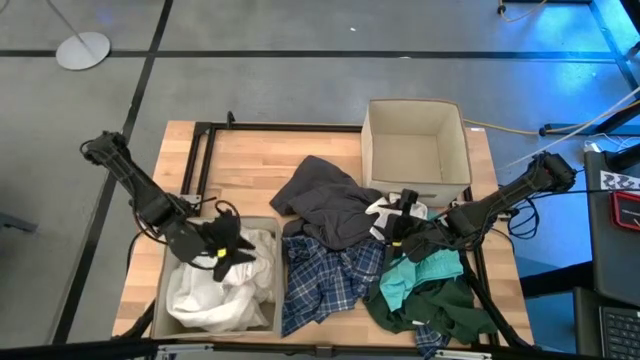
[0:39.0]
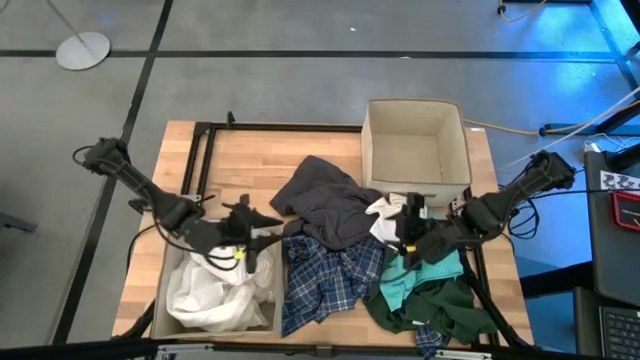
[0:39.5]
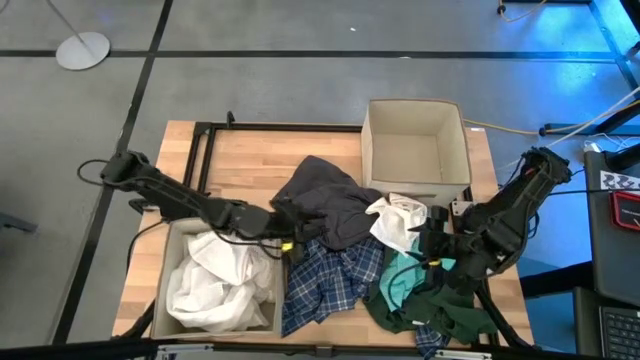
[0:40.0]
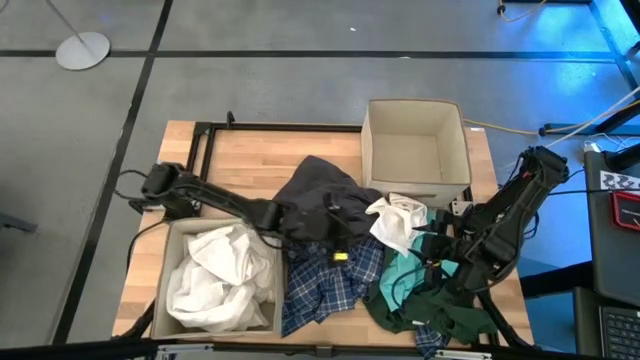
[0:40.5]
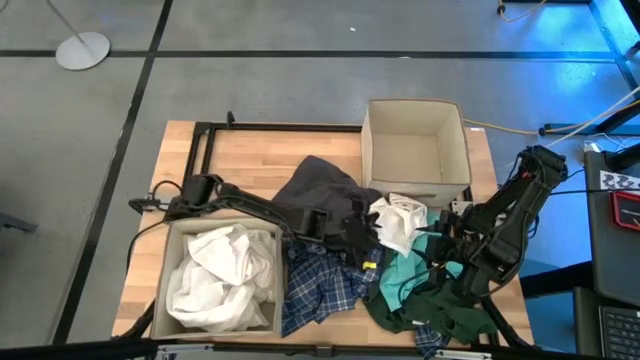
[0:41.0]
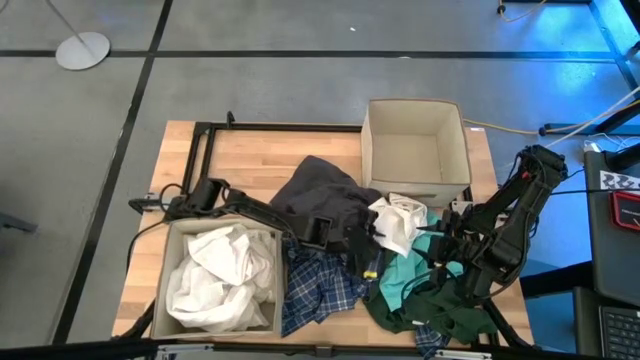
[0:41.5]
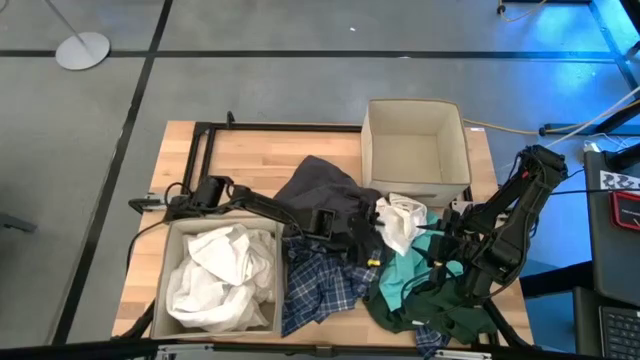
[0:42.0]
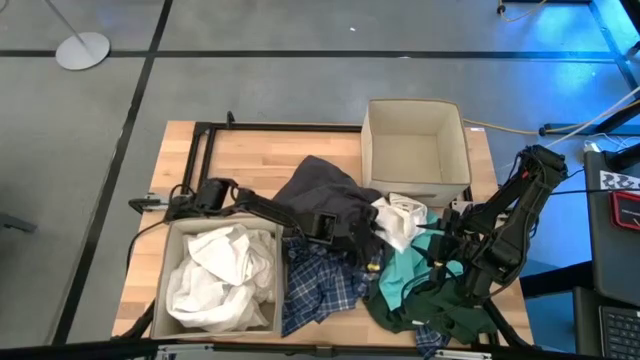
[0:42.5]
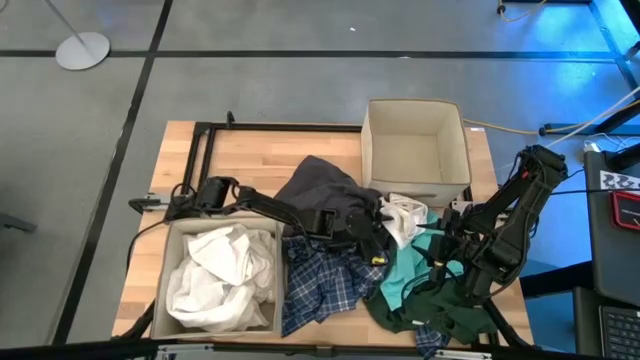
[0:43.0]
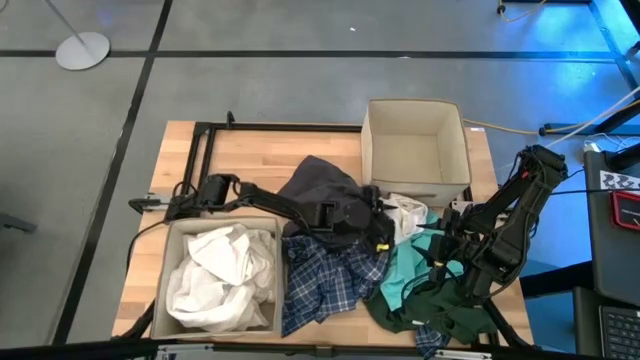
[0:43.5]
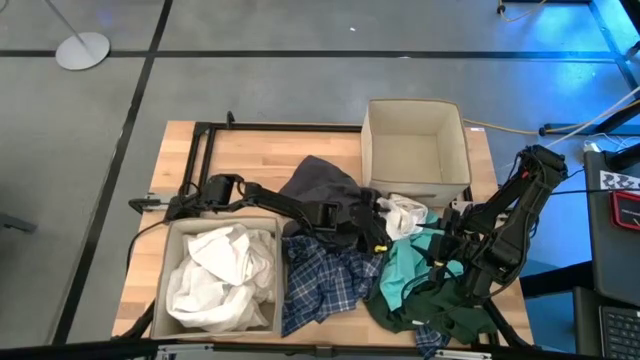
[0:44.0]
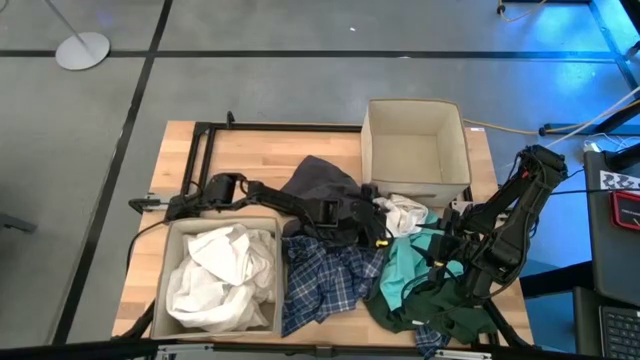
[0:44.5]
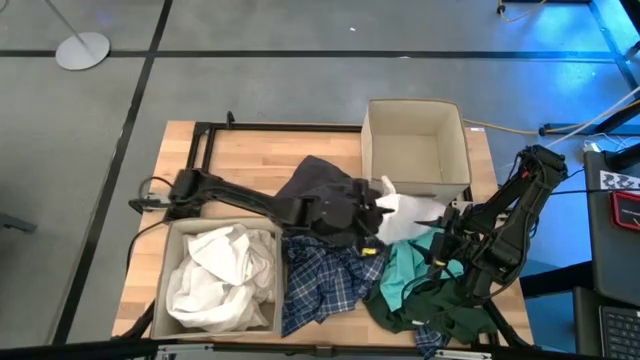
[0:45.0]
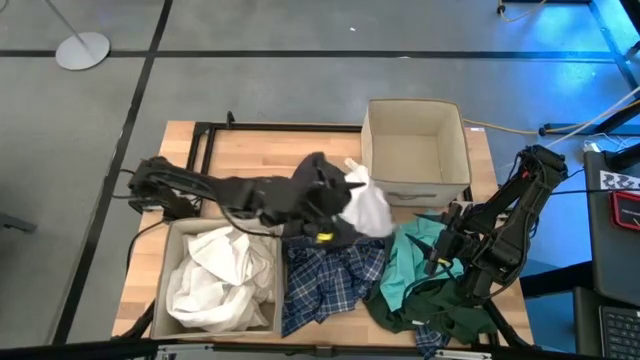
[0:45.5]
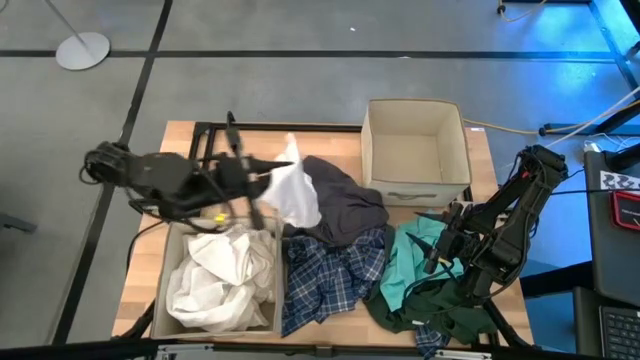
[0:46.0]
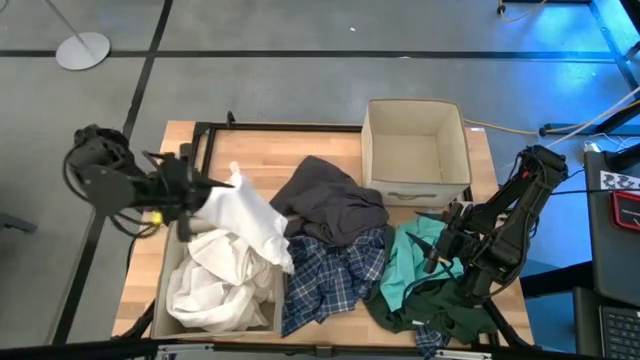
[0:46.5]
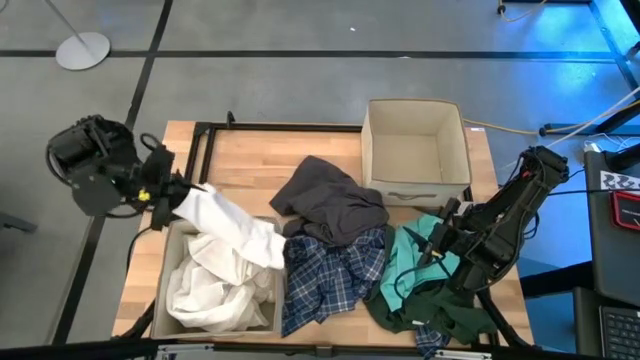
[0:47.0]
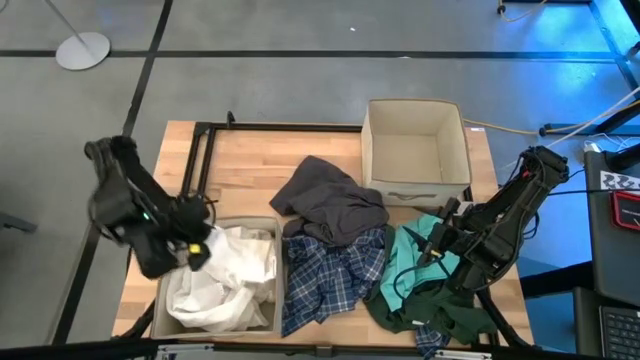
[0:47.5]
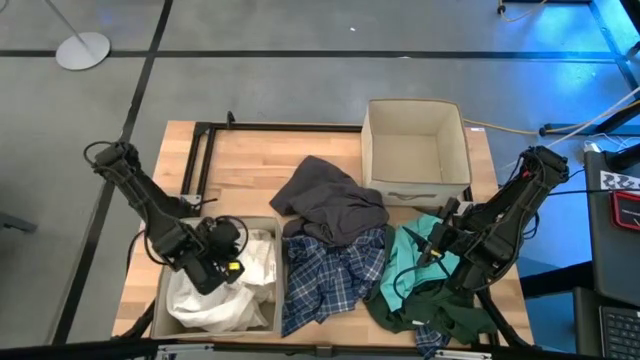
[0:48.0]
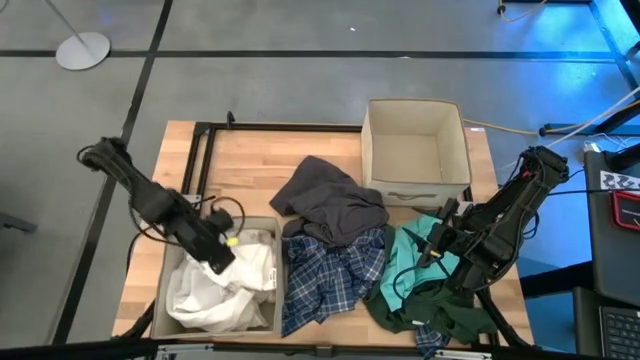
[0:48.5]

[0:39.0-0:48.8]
Task: Sort clothes
Put the white shorts into the bottom brown laundry bin

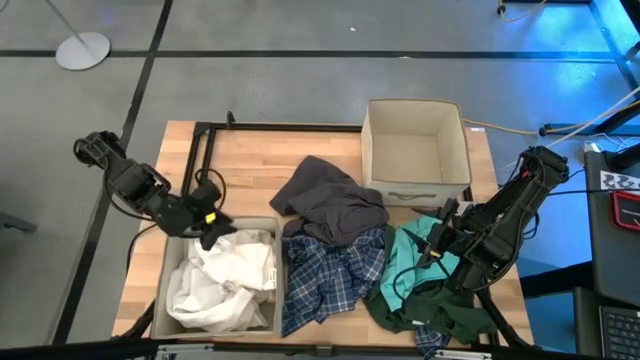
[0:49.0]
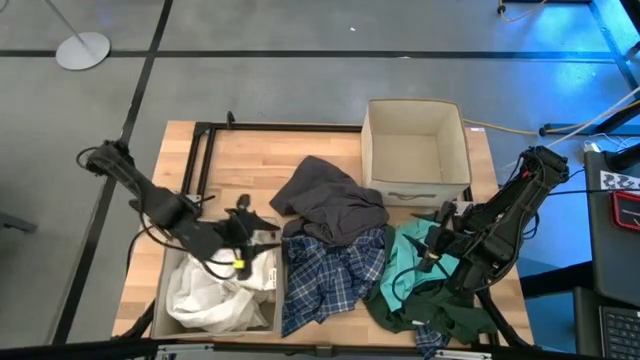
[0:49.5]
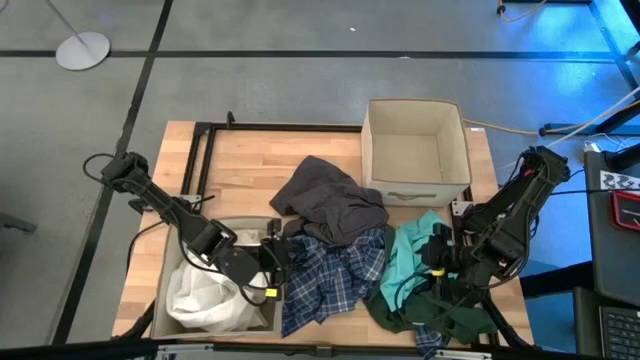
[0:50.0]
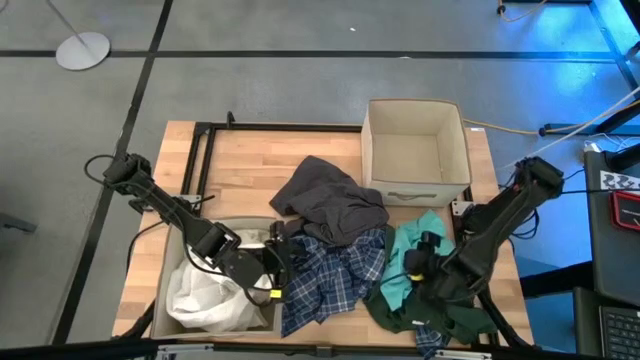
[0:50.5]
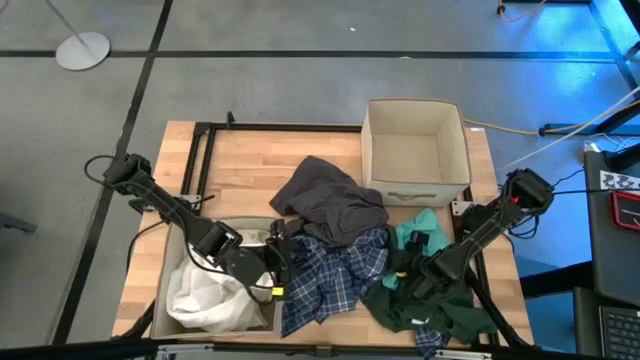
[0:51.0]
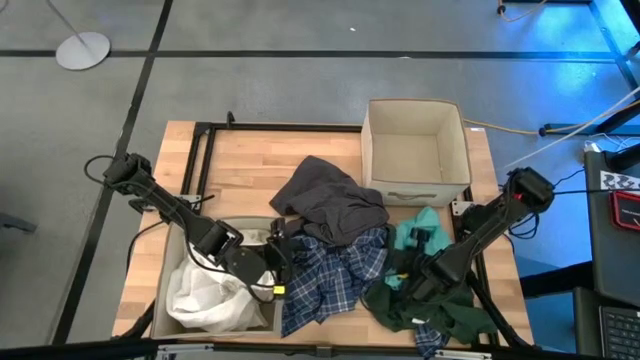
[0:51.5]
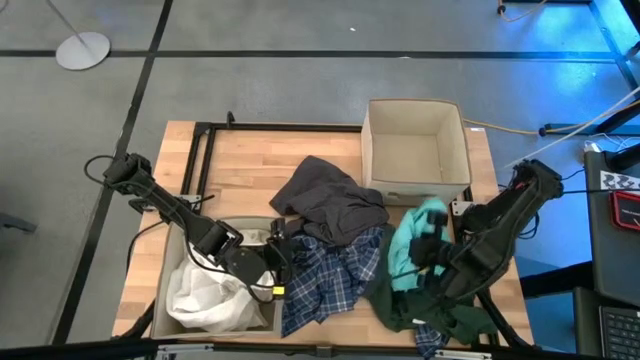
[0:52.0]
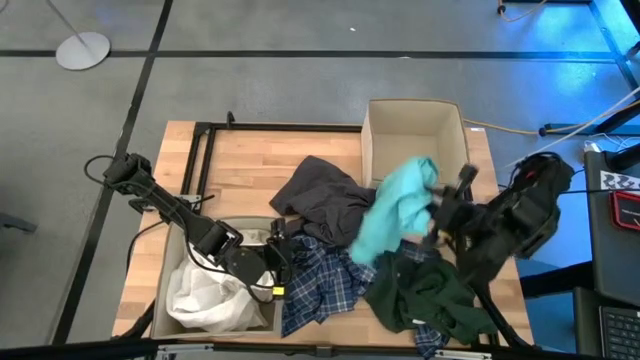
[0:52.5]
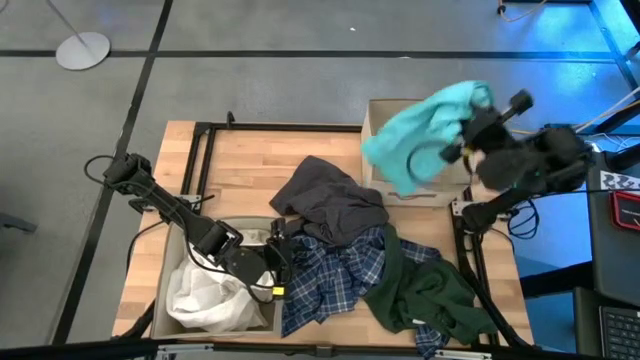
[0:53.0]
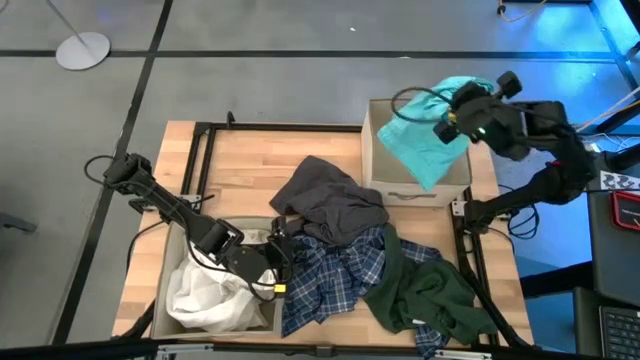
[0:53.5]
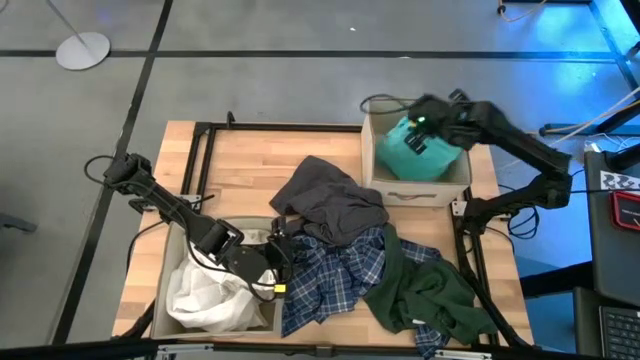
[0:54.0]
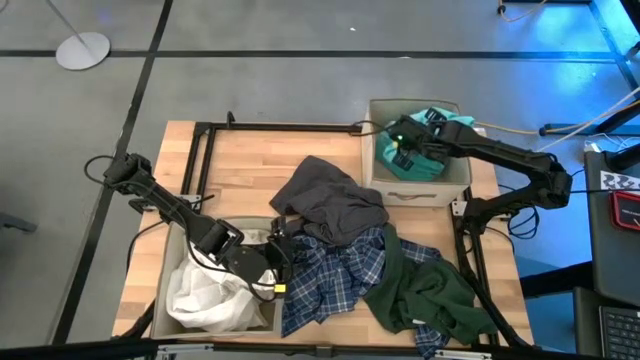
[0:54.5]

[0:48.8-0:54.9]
Put the blue shorts into the top brown laundry bin

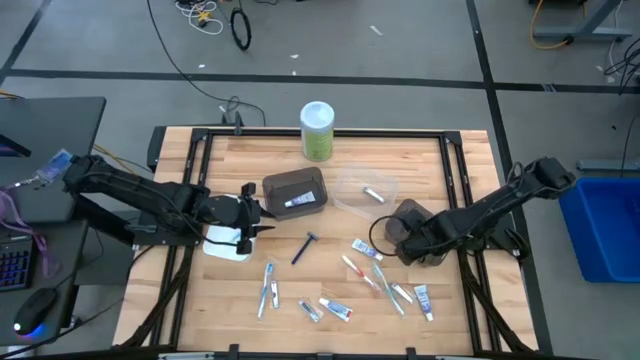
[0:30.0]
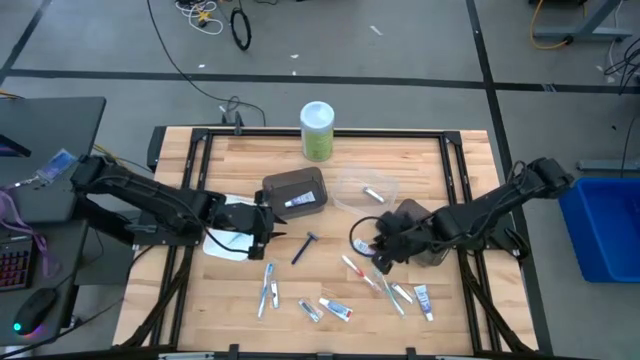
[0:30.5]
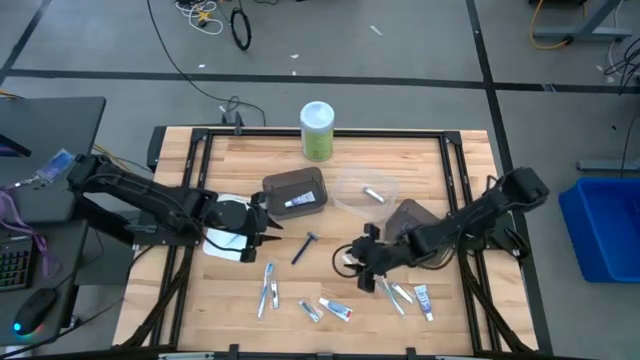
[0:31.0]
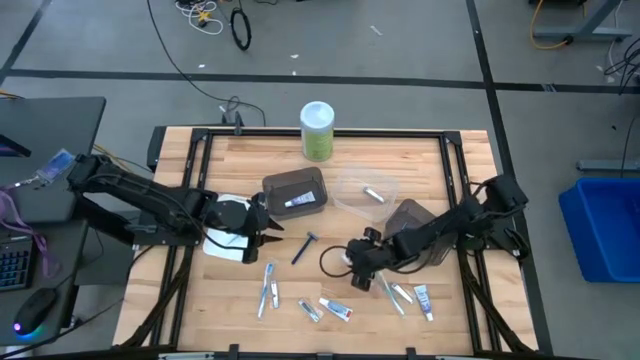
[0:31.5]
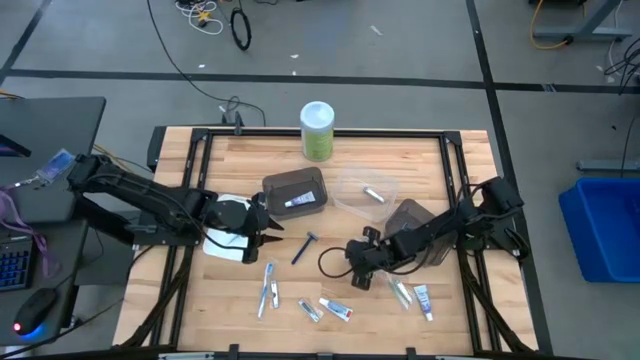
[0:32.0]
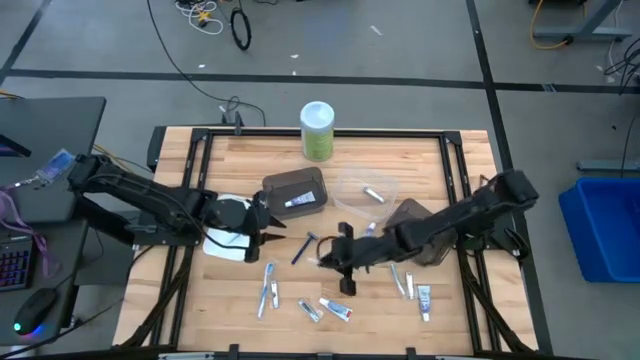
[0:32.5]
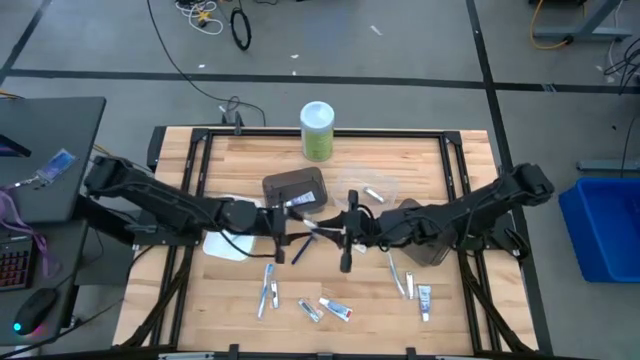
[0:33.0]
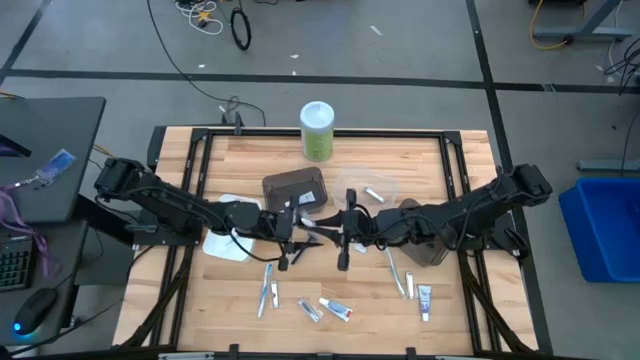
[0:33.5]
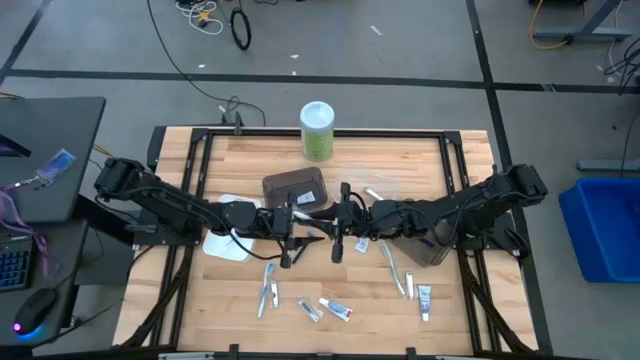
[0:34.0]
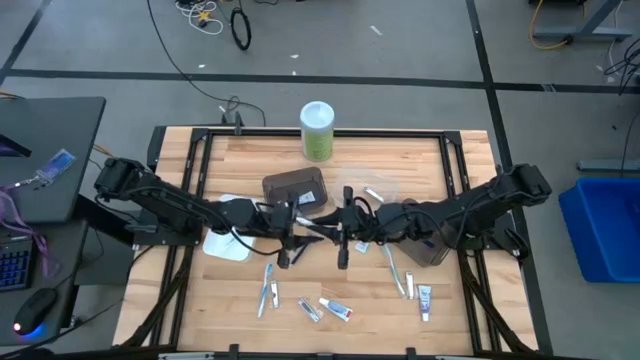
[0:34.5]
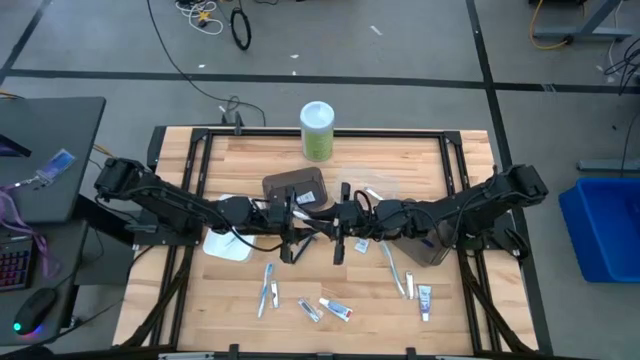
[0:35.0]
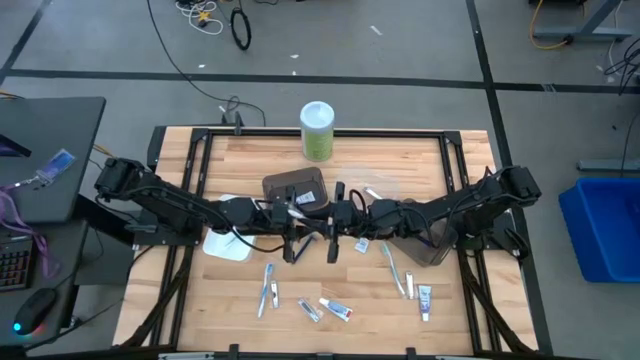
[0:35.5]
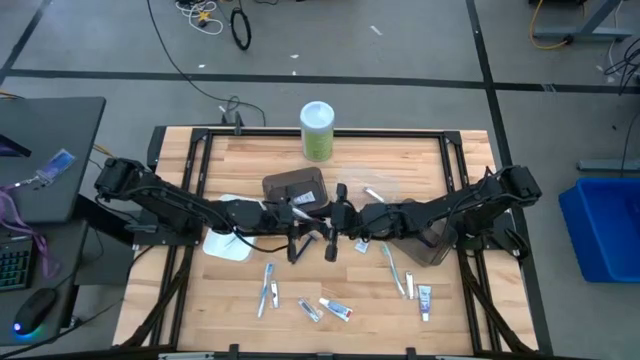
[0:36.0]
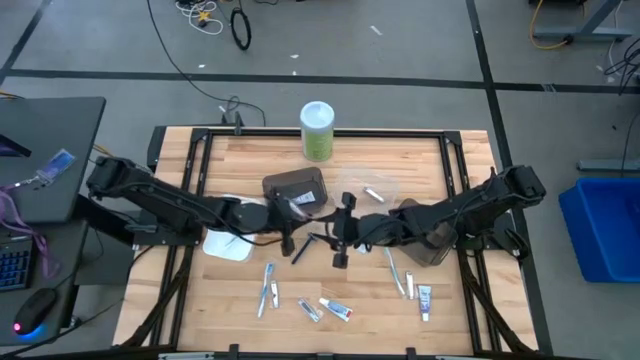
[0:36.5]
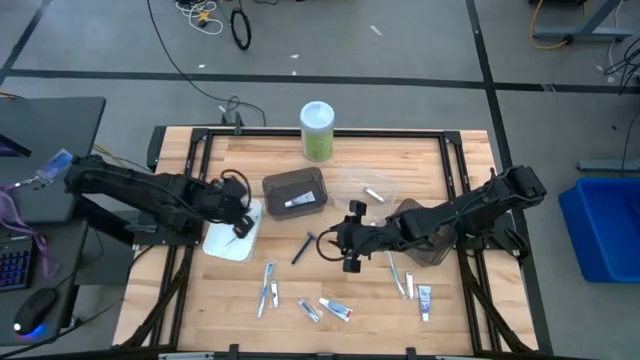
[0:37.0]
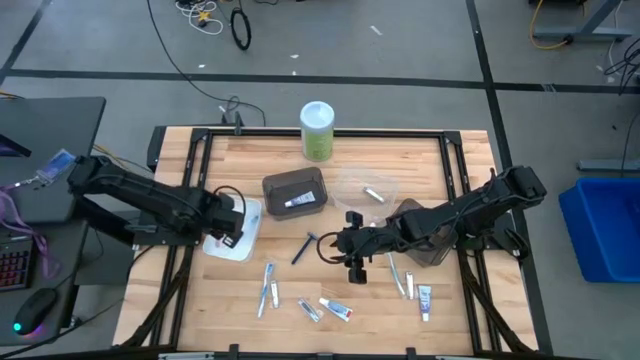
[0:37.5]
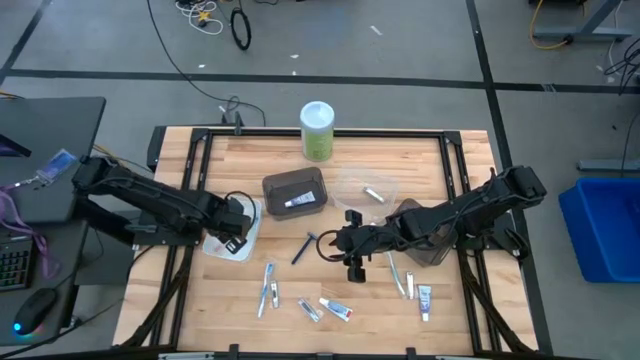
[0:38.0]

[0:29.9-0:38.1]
Task: Pick & Place Travel size toiletries
Put the red toothbrush into the white bin
